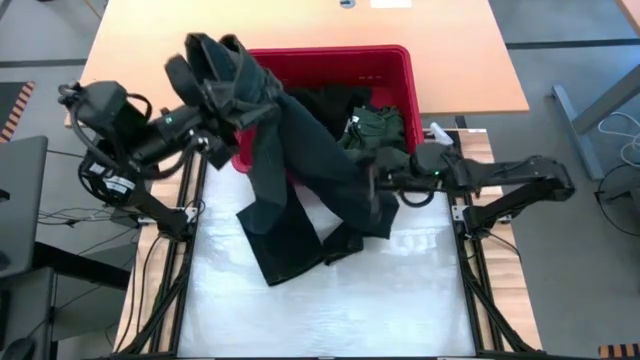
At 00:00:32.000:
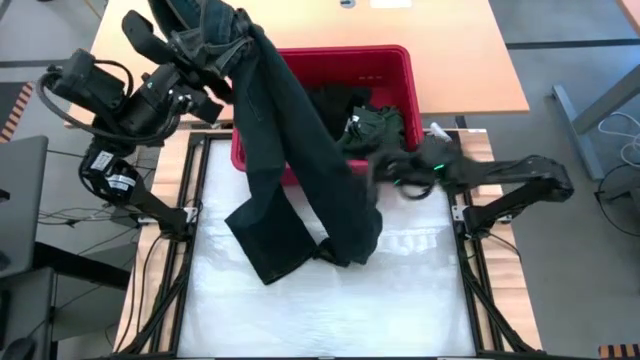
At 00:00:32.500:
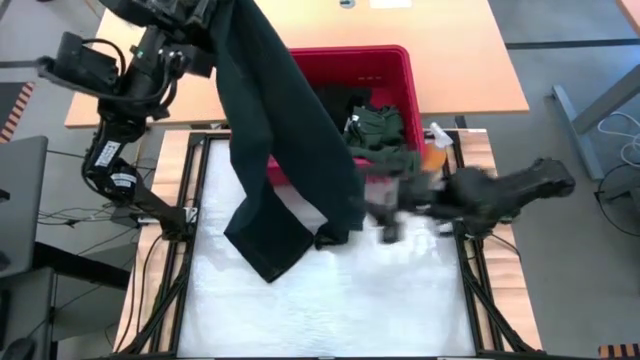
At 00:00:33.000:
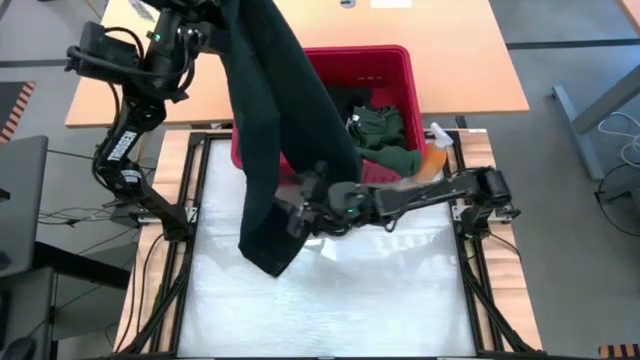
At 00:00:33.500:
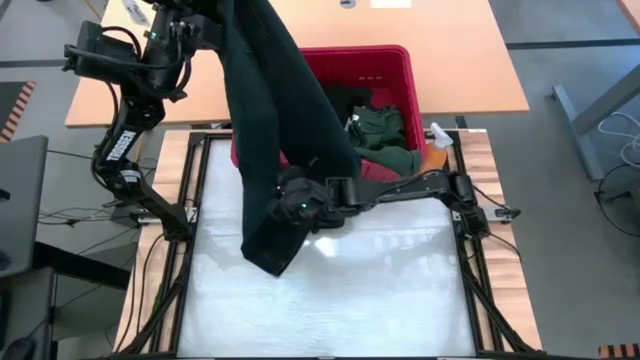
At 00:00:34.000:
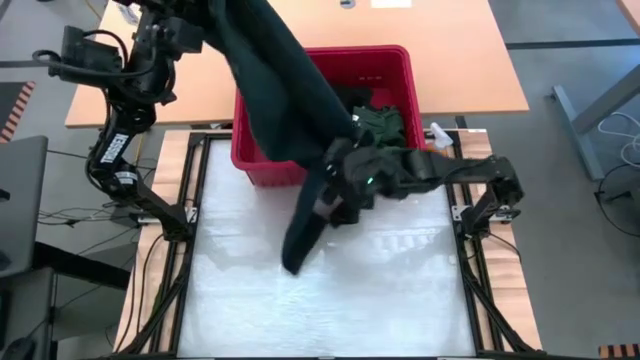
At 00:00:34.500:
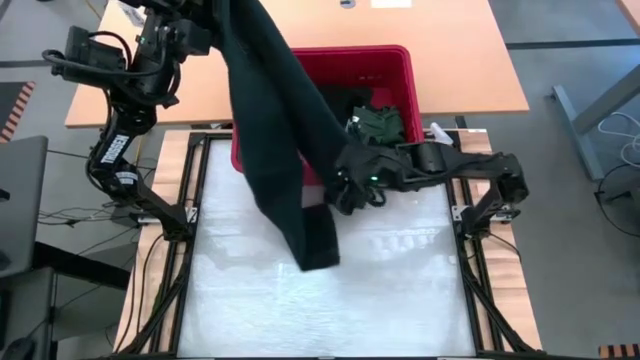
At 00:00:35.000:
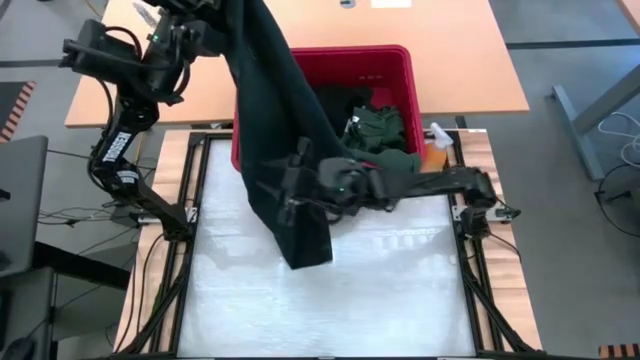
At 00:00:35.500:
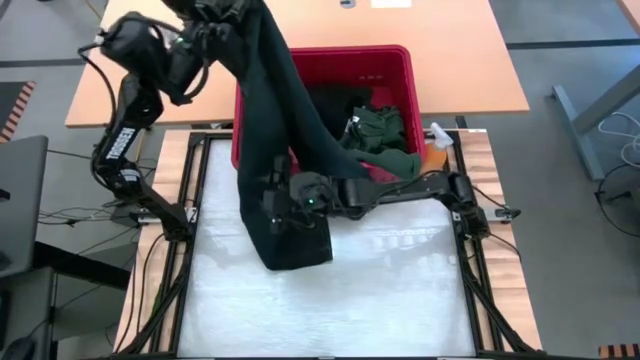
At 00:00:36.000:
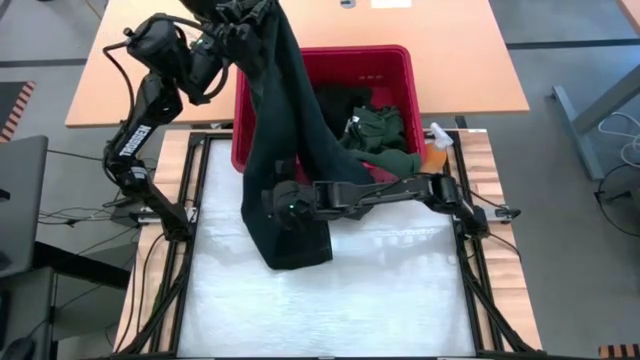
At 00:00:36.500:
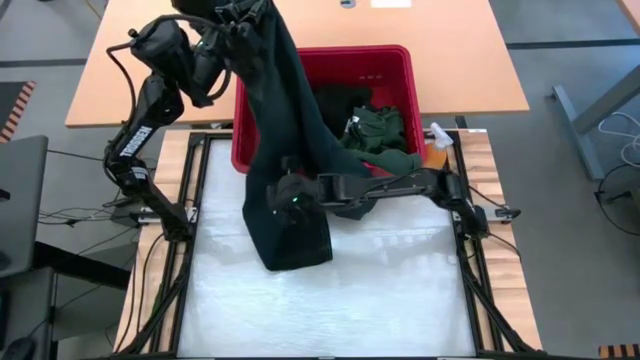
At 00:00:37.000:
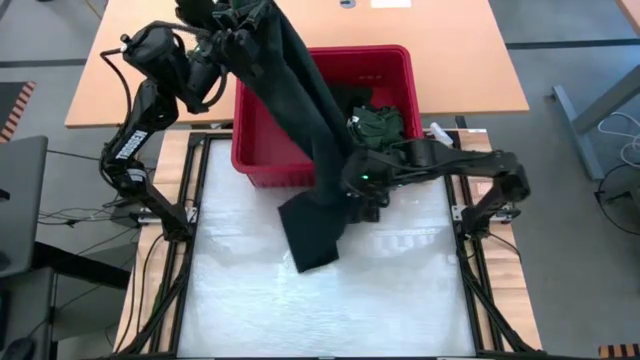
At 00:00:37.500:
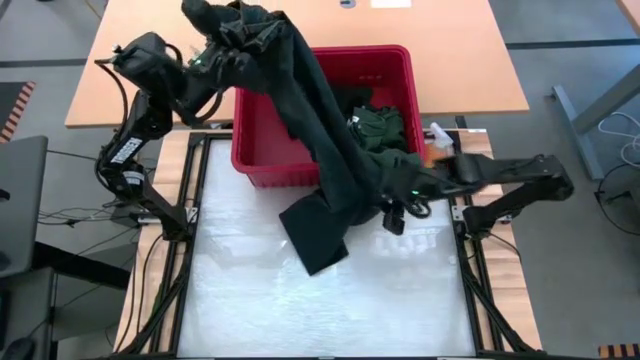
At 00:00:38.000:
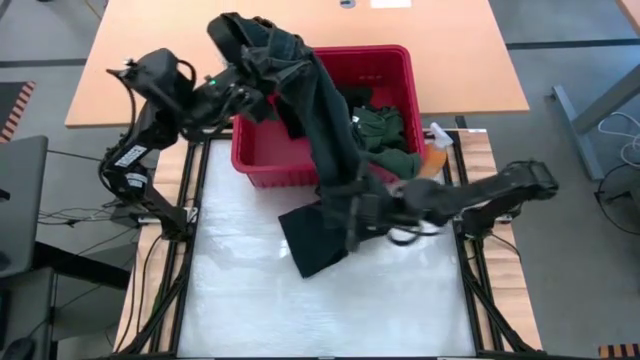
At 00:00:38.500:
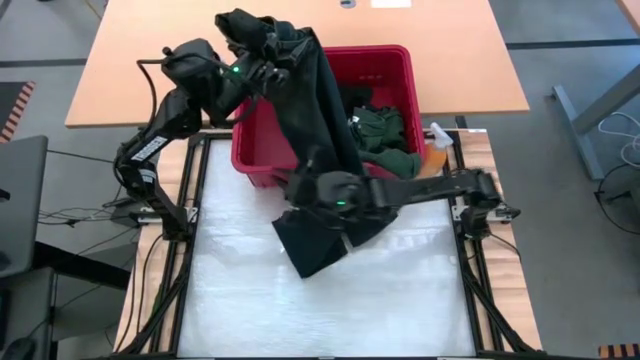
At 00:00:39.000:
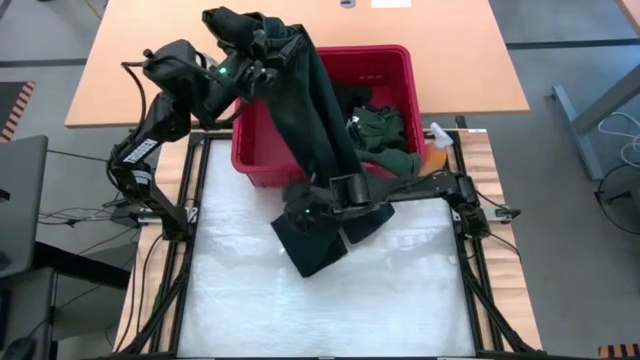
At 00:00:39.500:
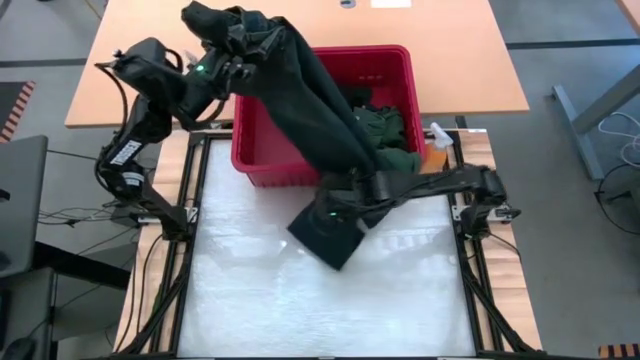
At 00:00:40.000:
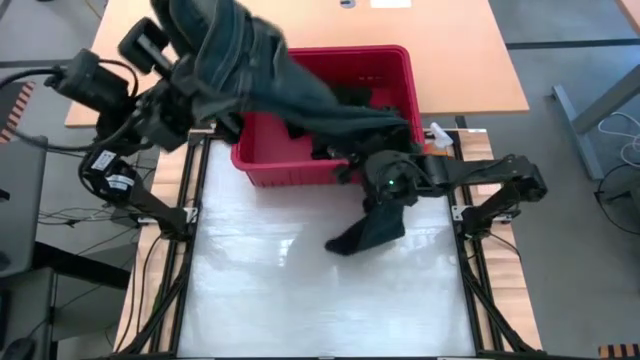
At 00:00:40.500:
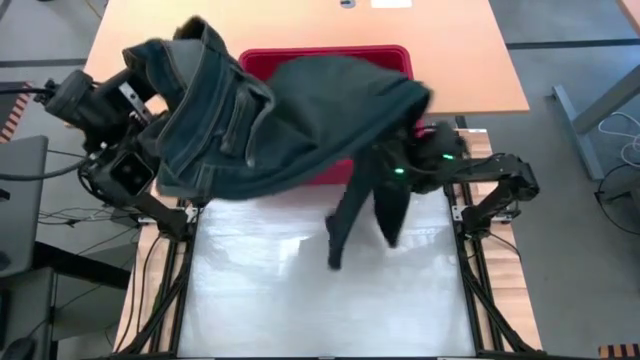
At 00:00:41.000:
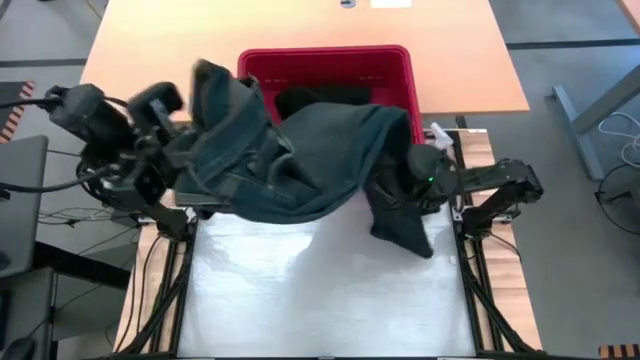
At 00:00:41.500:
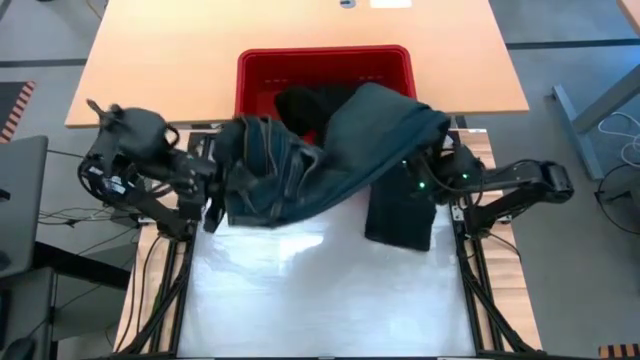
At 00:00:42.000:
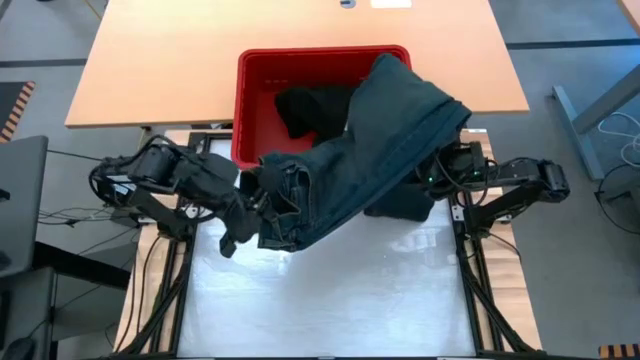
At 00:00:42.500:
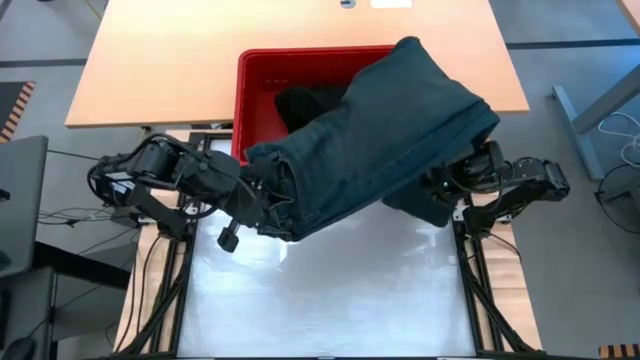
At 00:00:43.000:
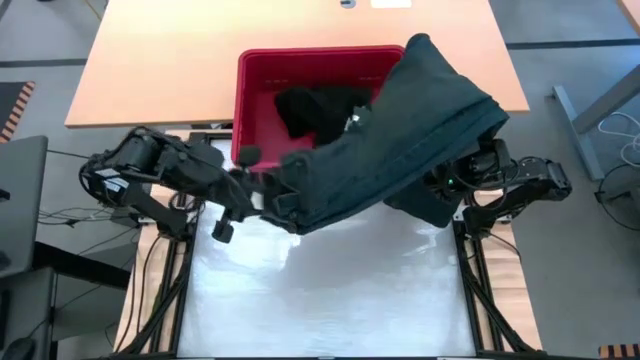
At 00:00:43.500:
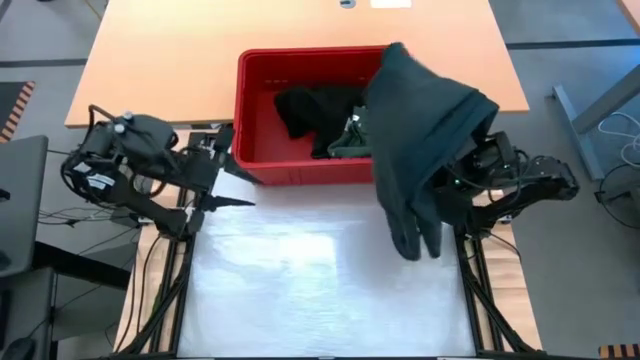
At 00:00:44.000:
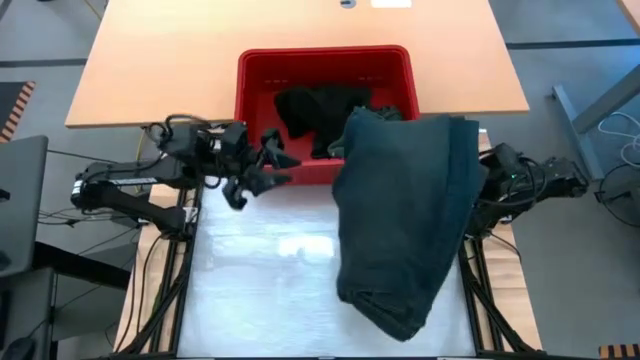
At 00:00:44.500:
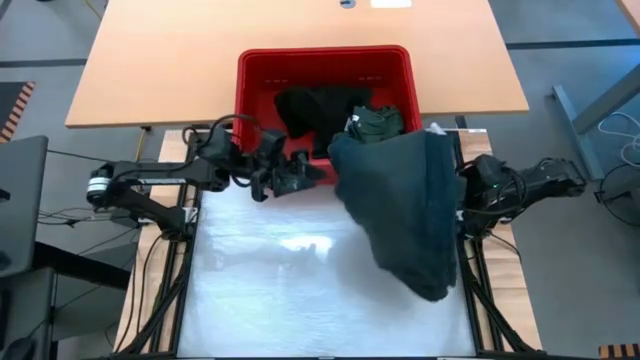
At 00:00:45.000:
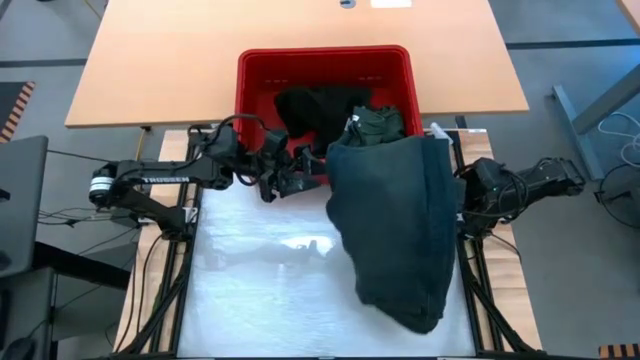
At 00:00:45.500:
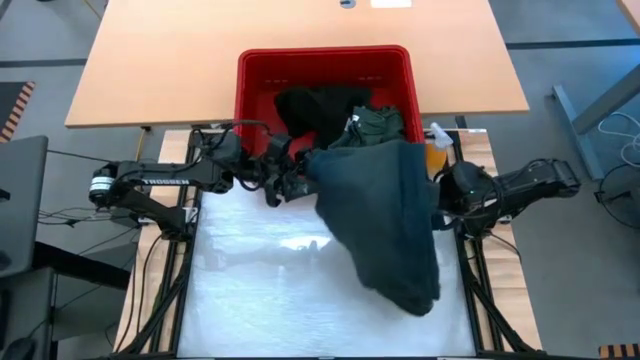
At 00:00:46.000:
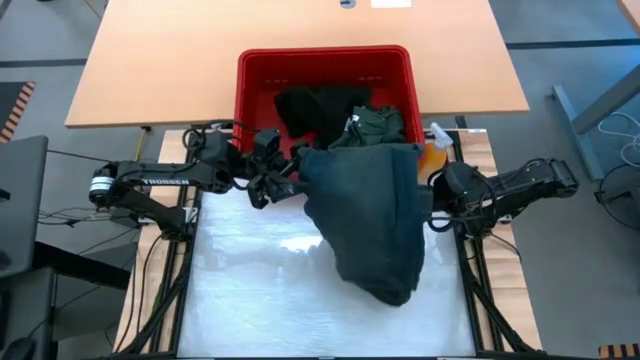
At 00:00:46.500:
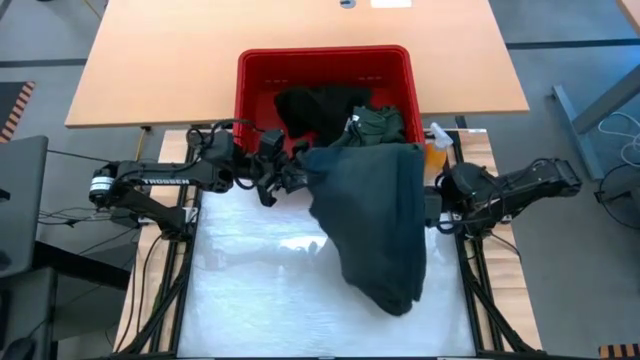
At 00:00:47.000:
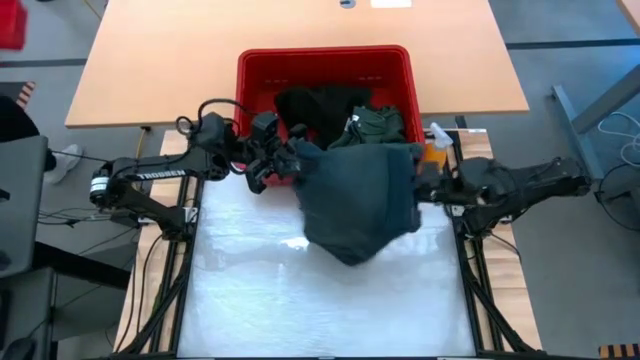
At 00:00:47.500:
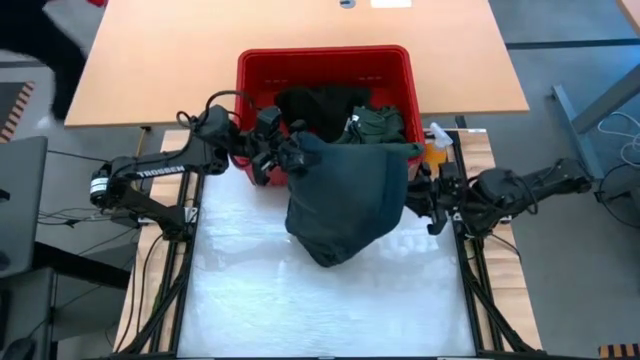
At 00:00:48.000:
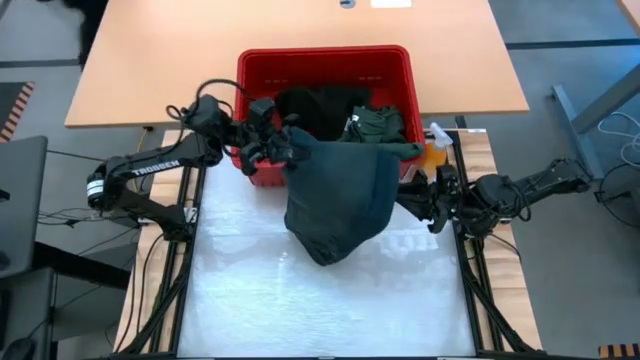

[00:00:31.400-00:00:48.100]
Task: Fold laundry
Fold the black pants
